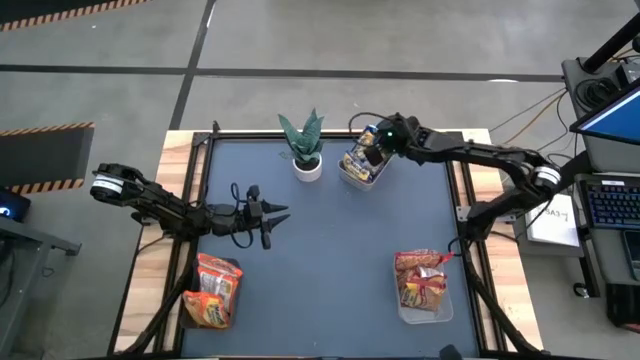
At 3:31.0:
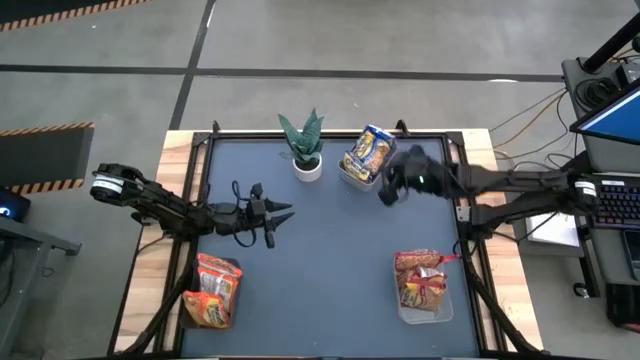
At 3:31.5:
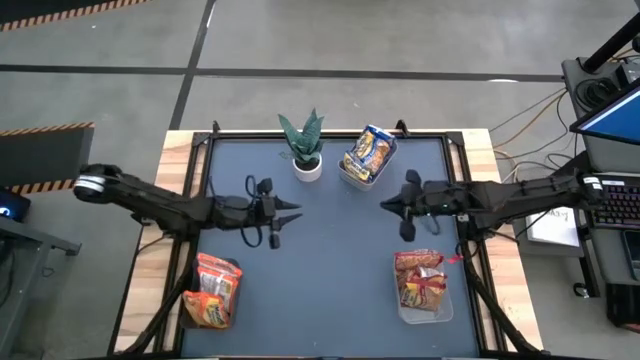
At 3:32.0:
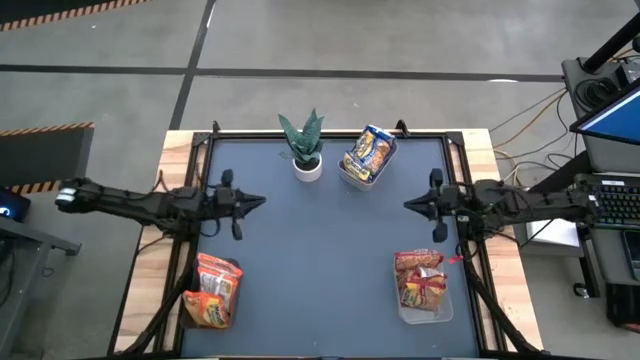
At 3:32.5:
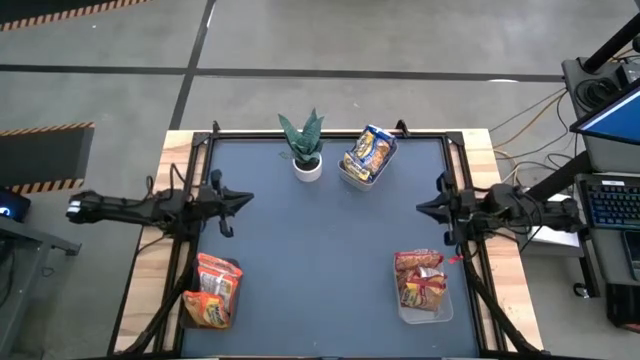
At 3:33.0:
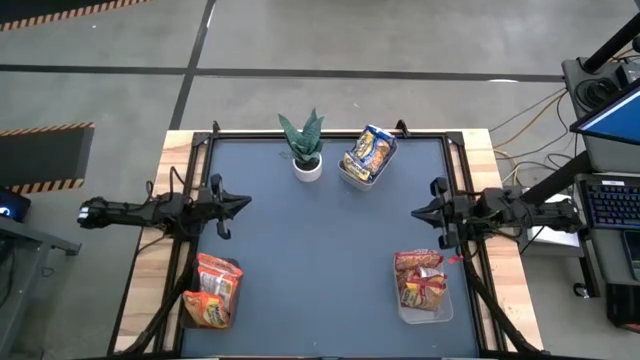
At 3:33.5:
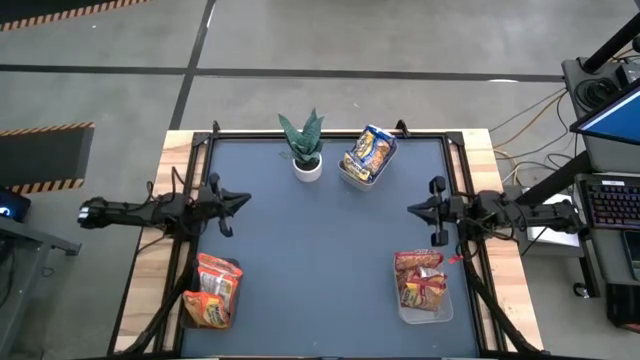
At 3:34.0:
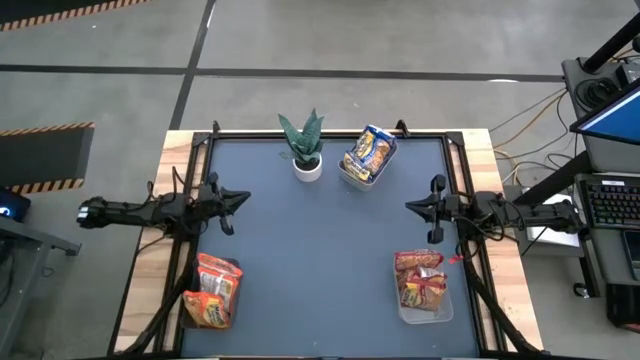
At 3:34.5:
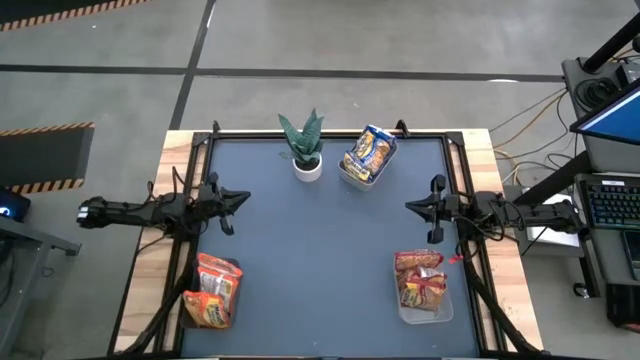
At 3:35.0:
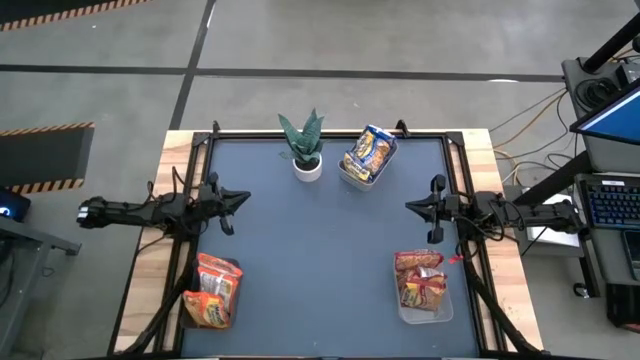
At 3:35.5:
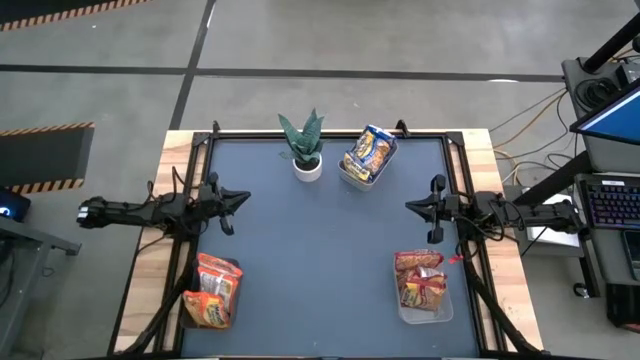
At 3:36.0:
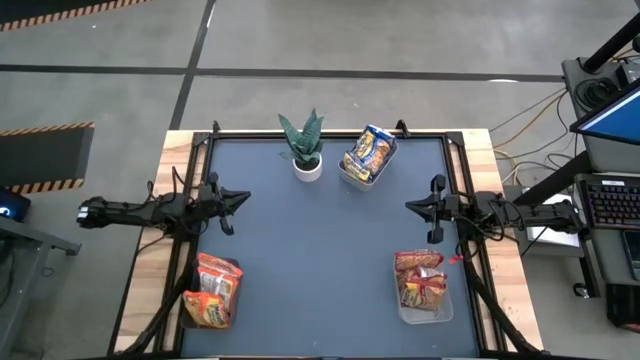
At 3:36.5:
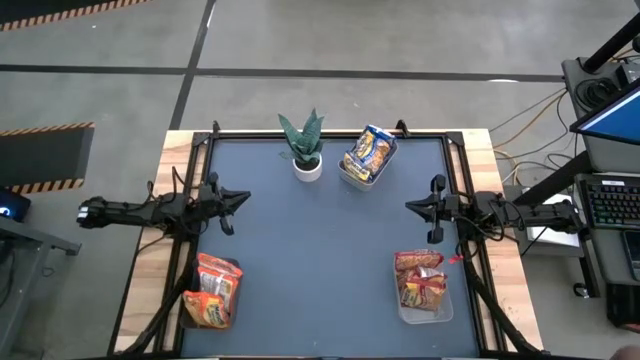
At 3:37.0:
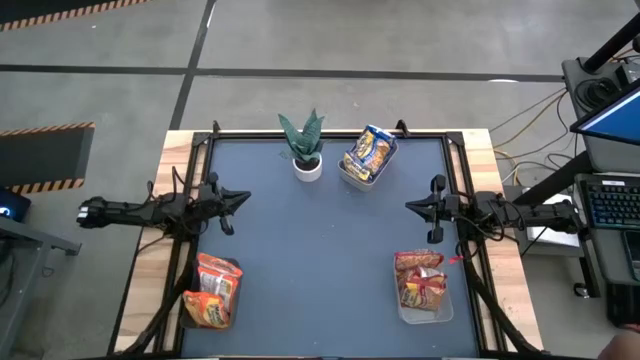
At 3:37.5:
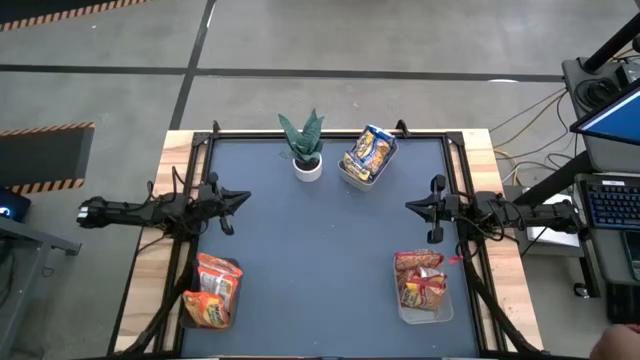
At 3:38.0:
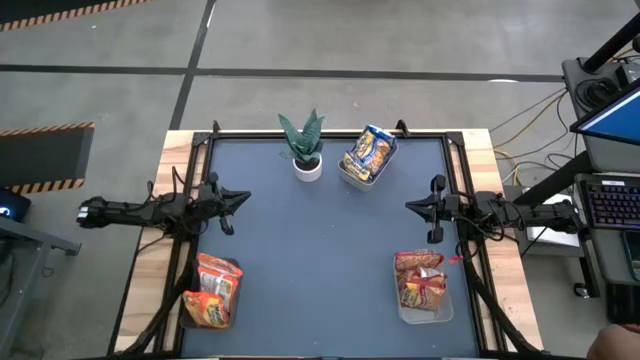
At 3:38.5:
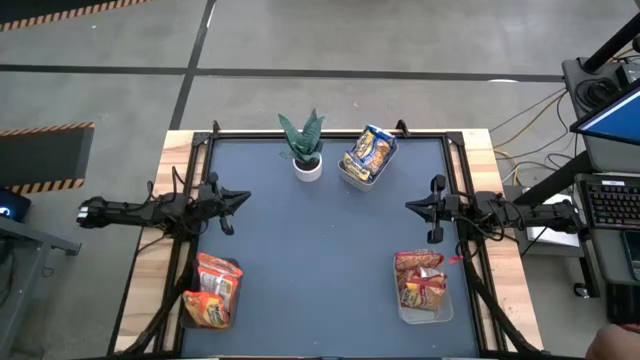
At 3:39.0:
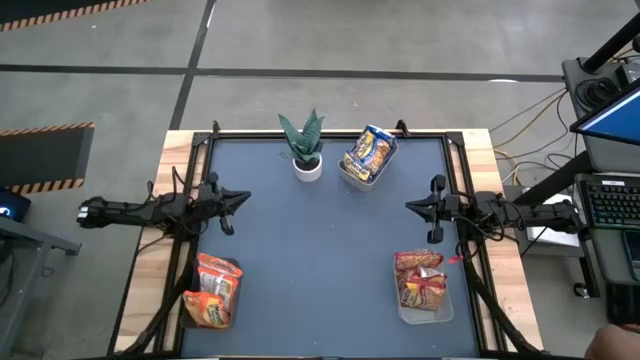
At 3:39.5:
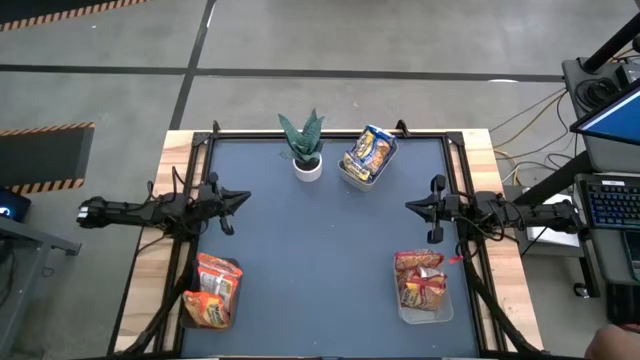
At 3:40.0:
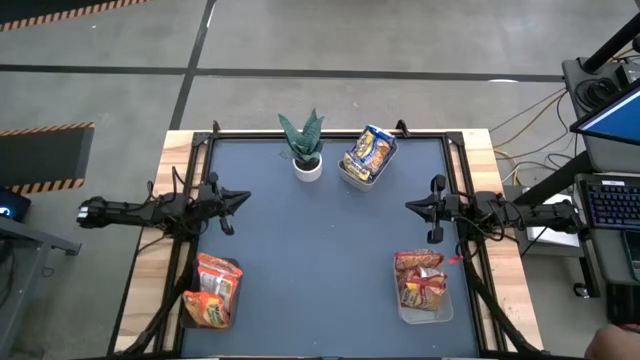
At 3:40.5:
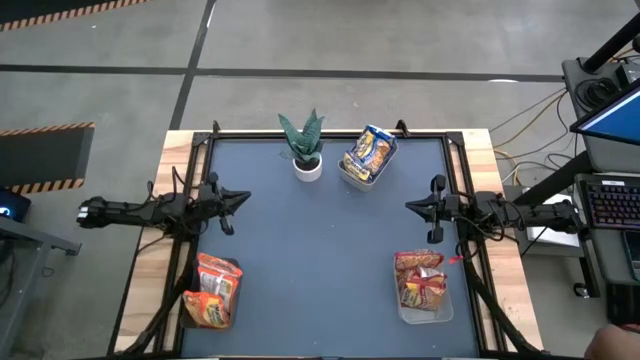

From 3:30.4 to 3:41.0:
Task: Sort Maruchan noodles
Return to Home Position

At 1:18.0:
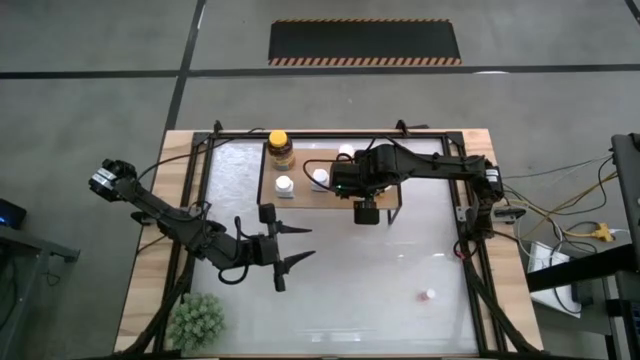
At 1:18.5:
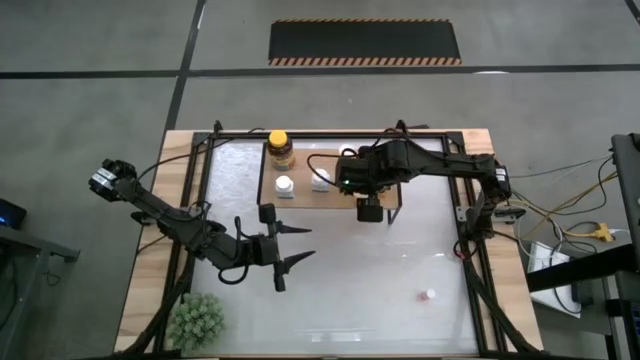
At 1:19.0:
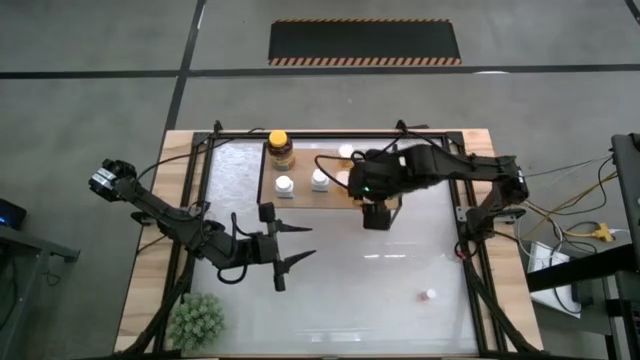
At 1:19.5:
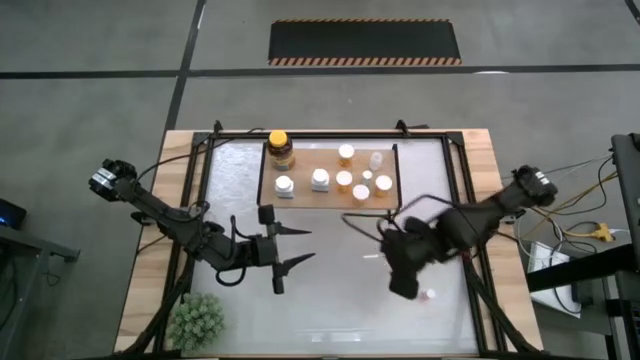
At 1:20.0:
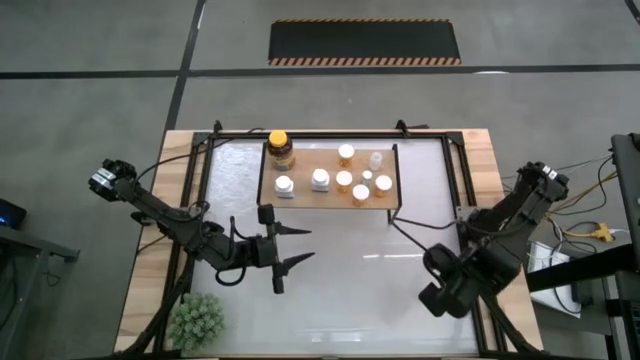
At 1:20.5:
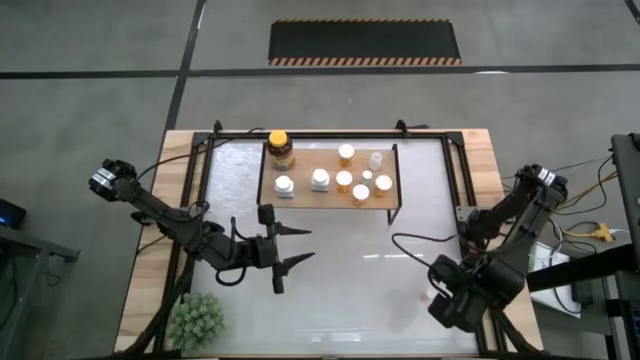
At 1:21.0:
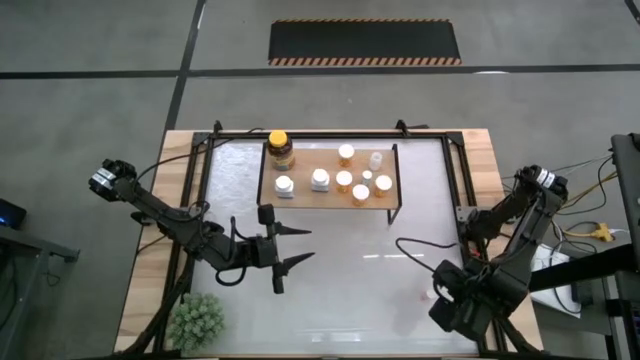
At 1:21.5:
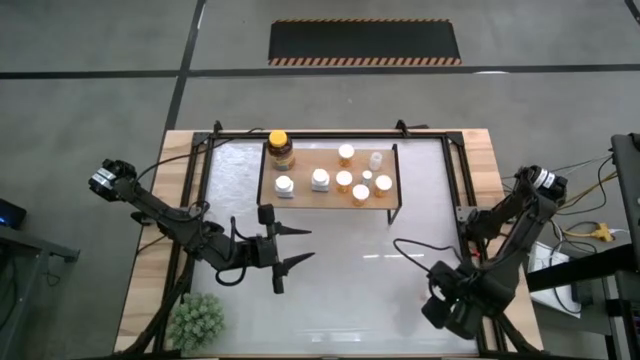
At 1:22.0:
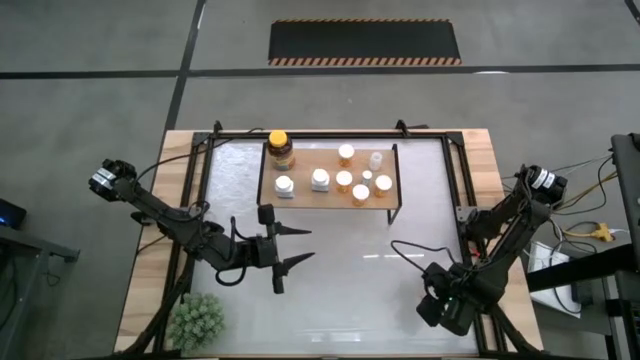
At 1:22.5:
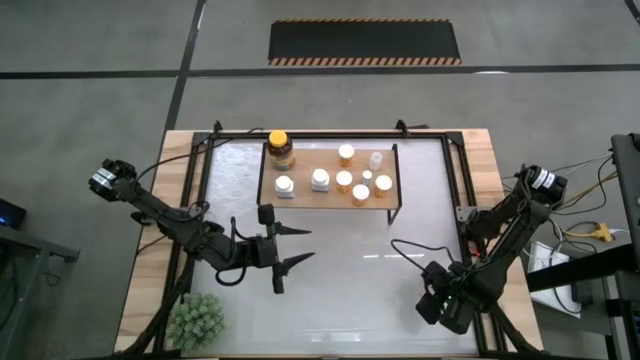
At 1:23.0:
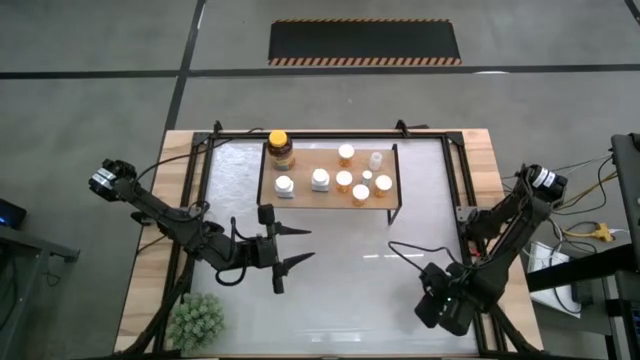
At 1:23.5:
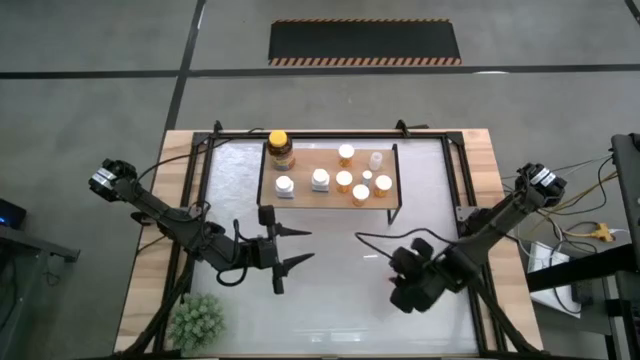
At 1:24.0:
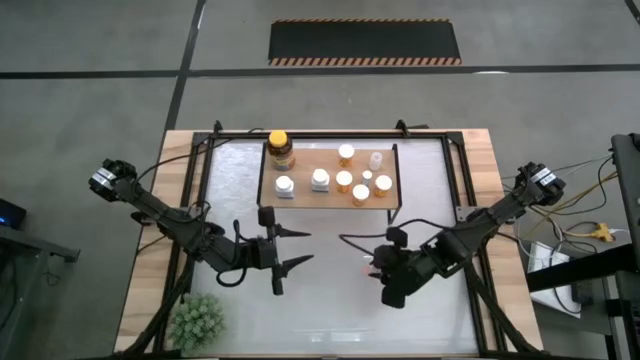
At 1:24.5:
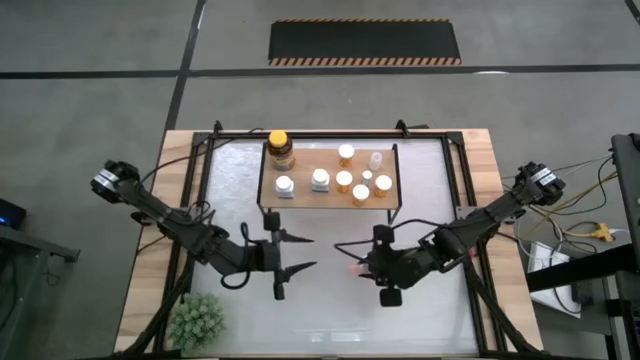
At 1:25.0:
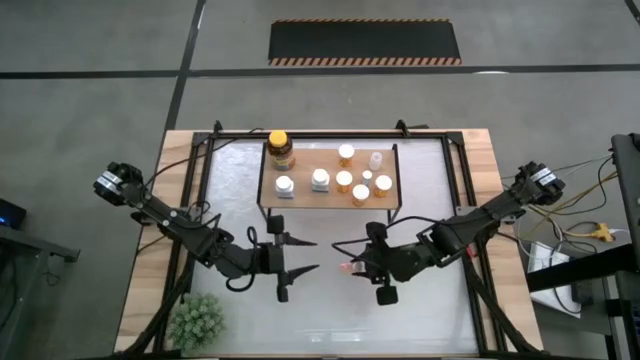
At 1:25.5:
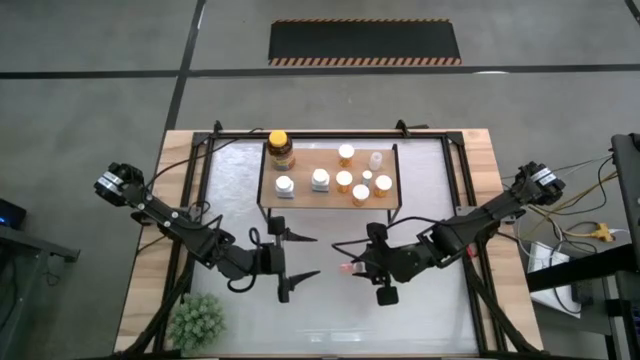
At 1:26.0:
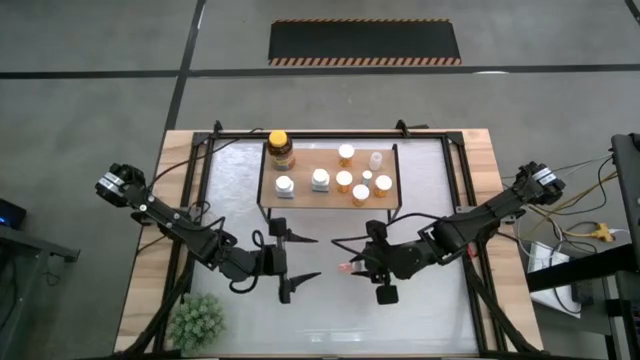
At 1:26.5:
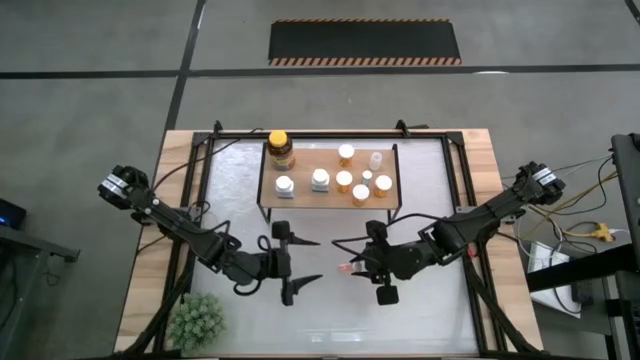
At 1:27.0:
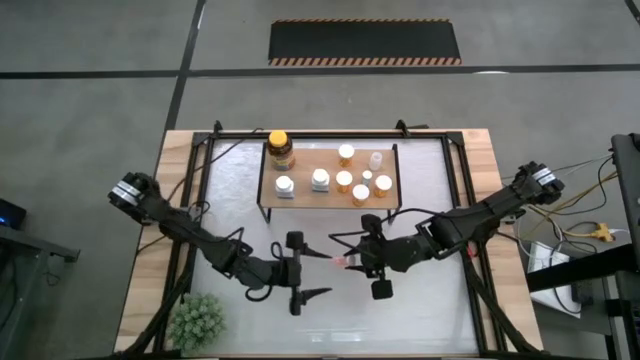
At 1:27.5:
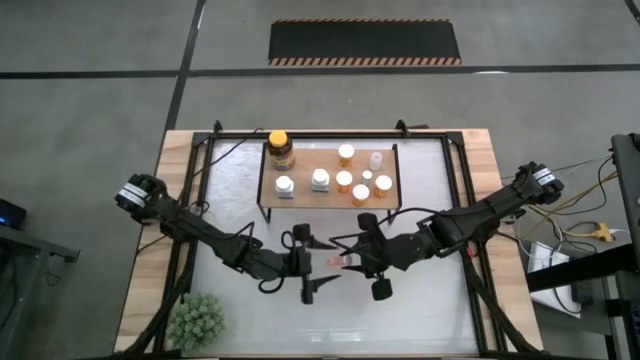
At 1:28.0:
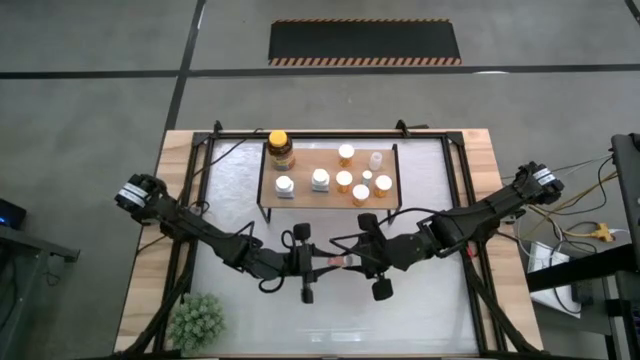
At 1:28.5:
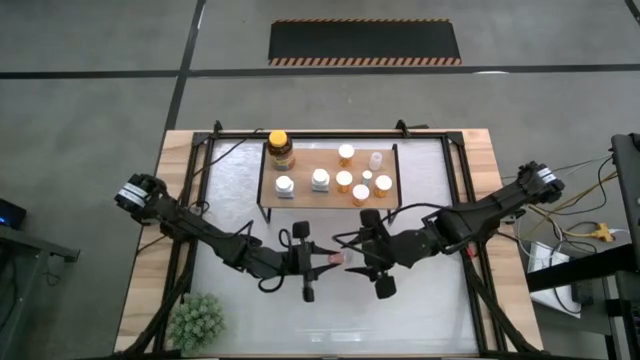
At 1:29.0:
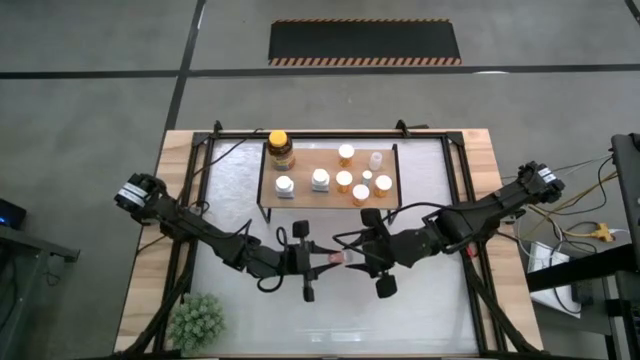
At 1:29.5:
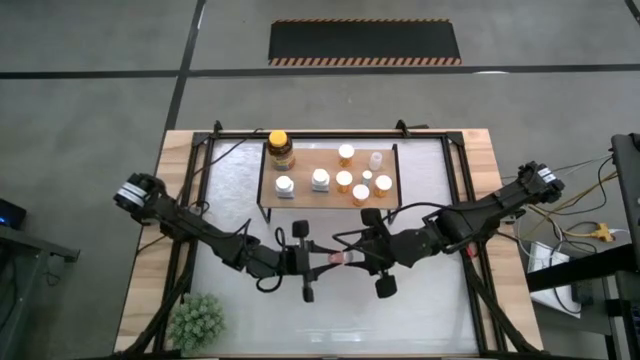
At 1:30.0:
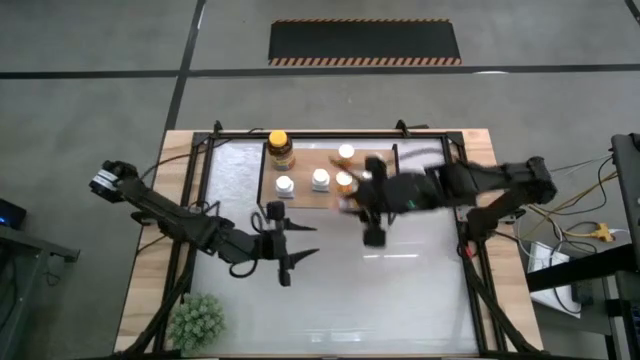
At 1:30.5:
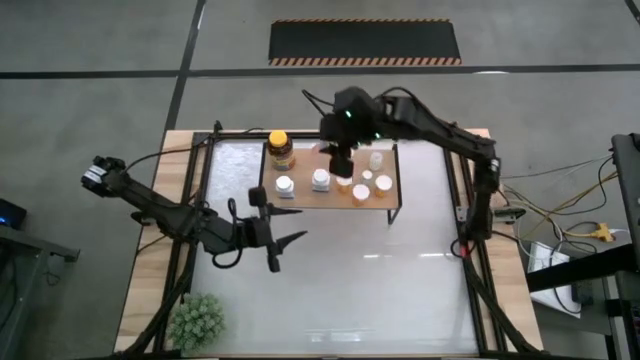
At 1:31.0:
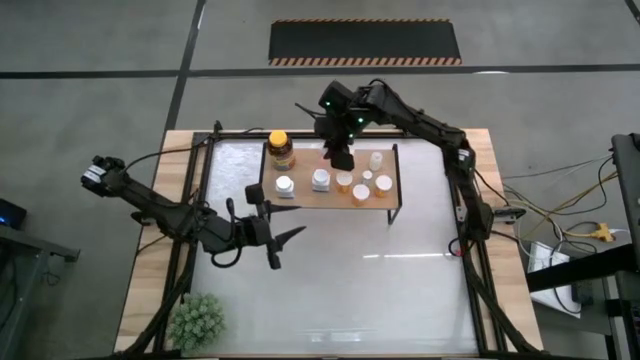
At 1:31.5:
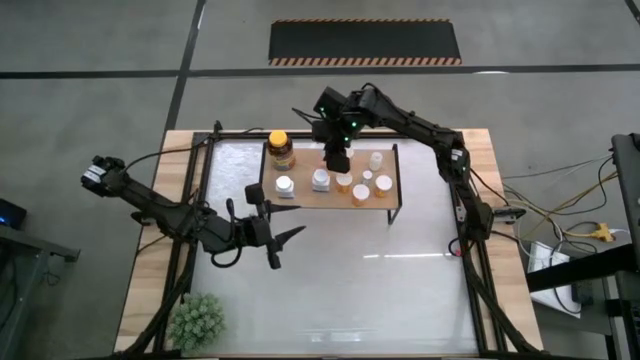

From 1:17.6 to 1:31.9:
Task: Pick and place medicine bottles onto shelf by color
Put the pink pill bottle on the shelf
